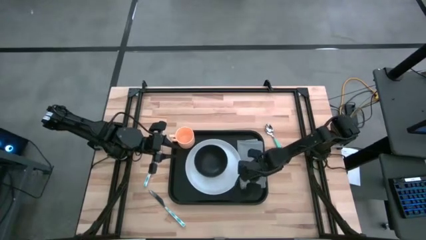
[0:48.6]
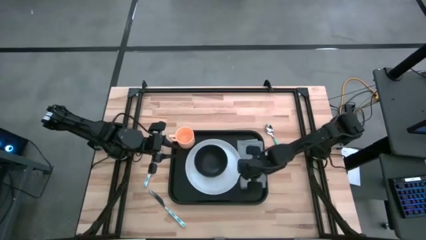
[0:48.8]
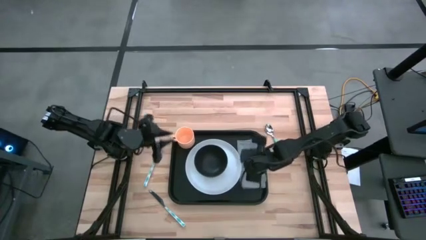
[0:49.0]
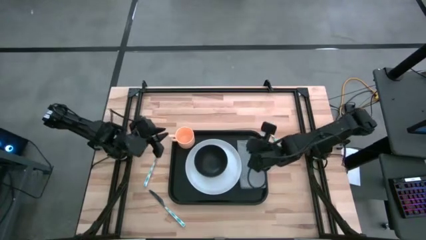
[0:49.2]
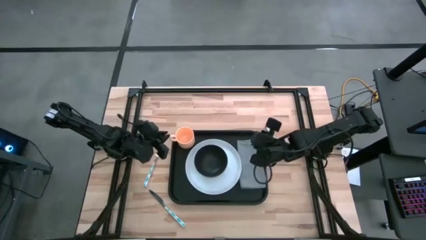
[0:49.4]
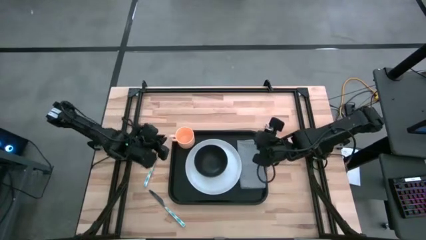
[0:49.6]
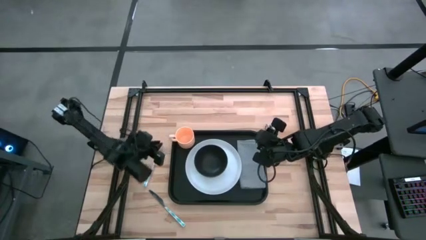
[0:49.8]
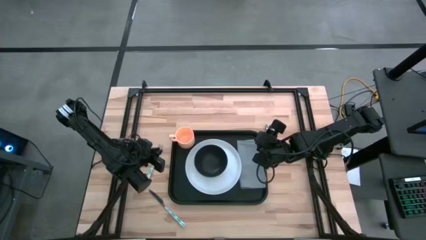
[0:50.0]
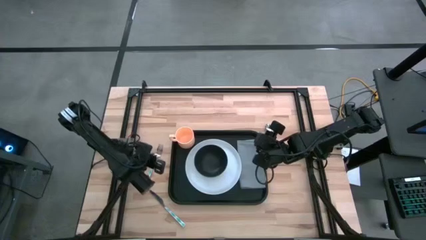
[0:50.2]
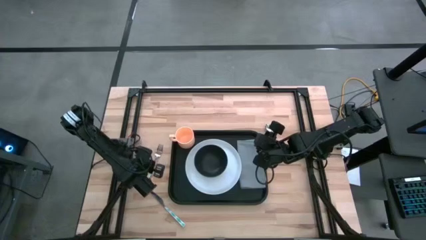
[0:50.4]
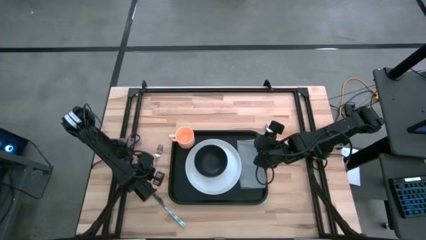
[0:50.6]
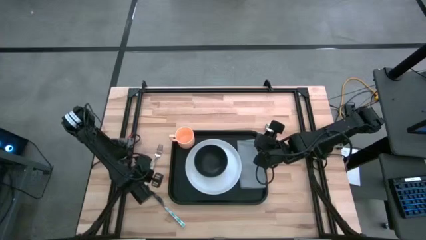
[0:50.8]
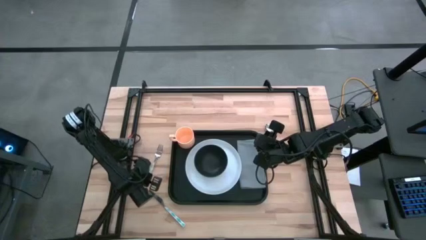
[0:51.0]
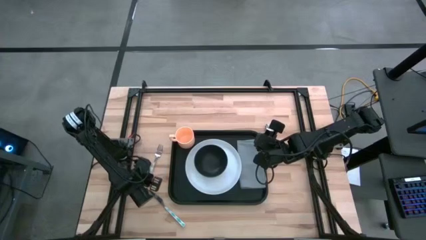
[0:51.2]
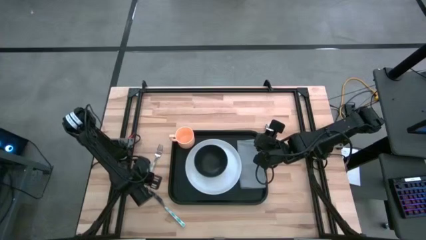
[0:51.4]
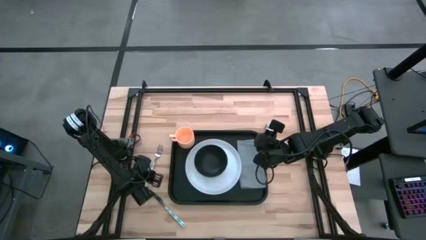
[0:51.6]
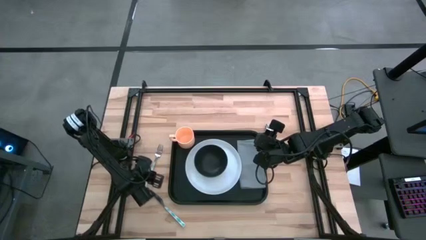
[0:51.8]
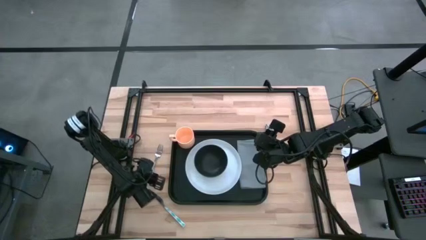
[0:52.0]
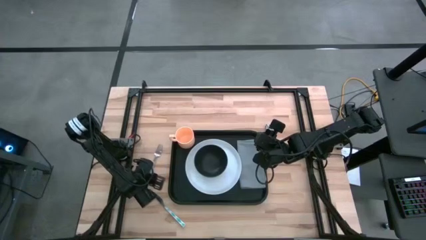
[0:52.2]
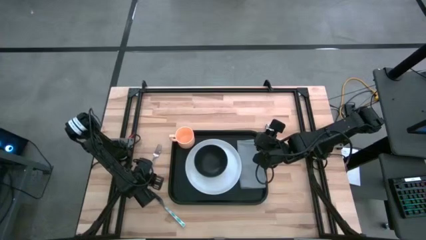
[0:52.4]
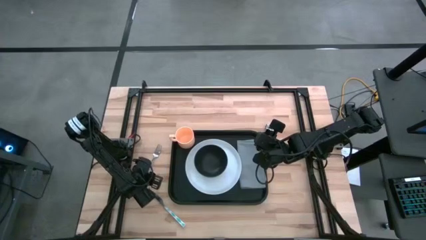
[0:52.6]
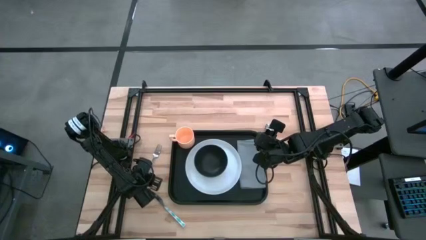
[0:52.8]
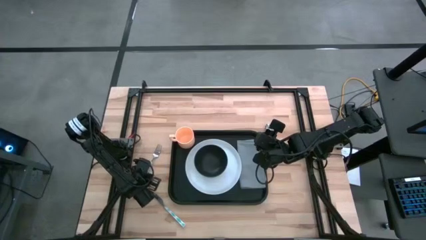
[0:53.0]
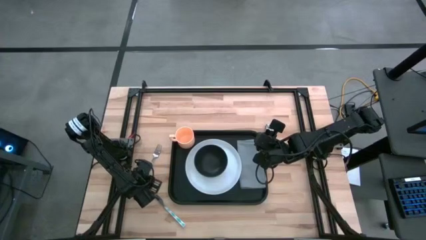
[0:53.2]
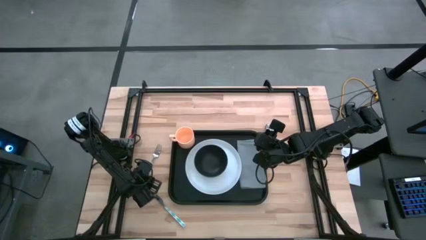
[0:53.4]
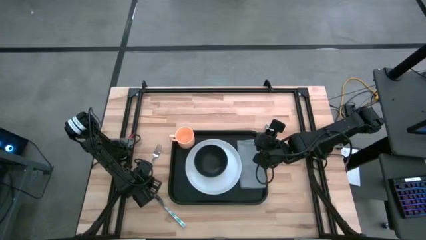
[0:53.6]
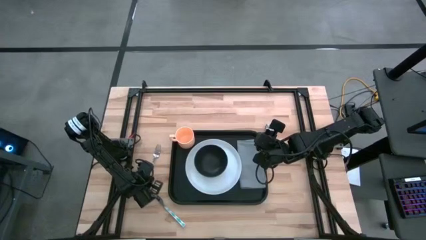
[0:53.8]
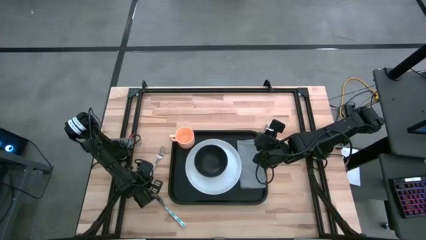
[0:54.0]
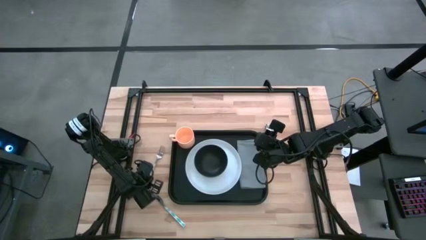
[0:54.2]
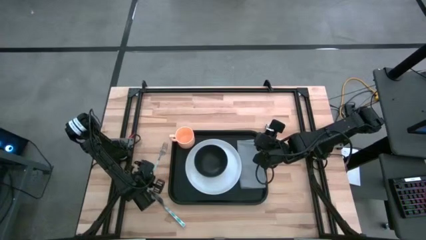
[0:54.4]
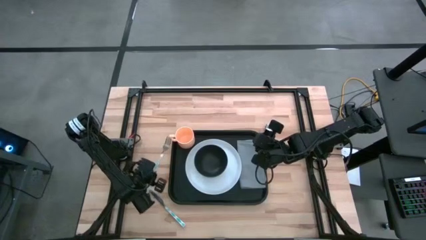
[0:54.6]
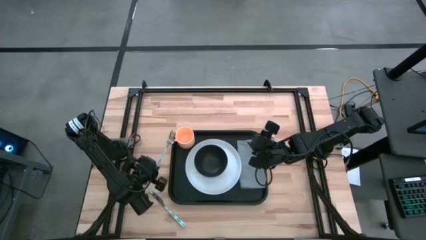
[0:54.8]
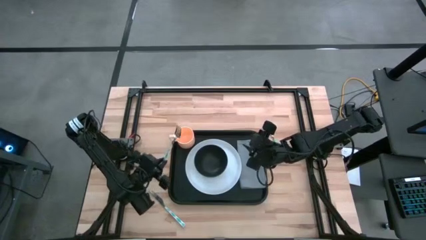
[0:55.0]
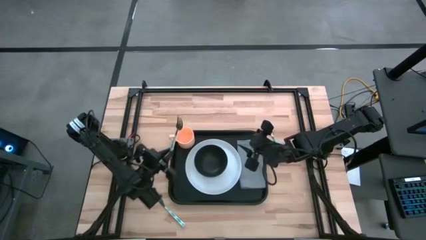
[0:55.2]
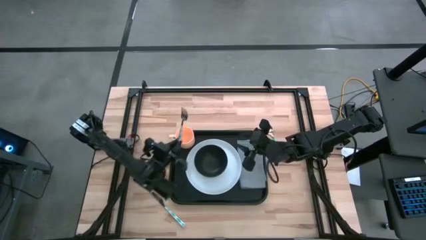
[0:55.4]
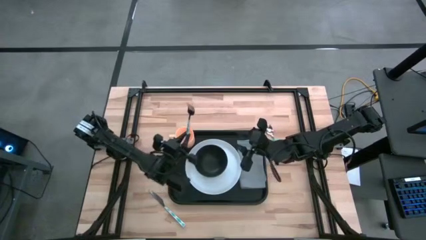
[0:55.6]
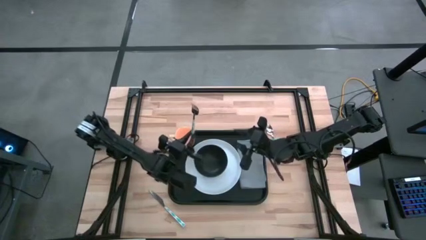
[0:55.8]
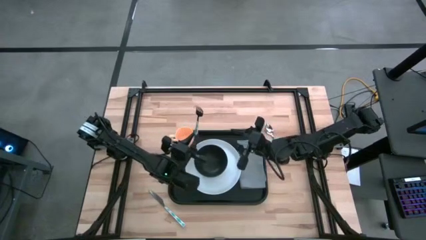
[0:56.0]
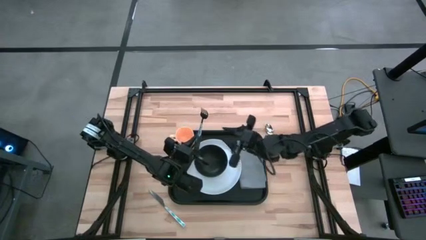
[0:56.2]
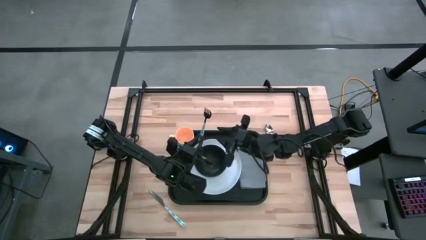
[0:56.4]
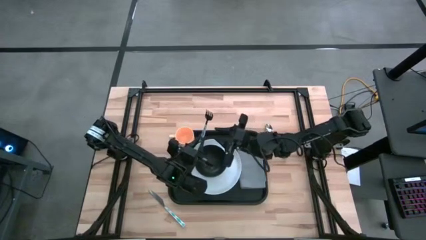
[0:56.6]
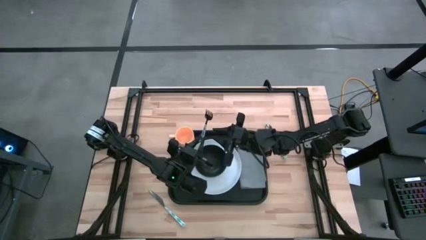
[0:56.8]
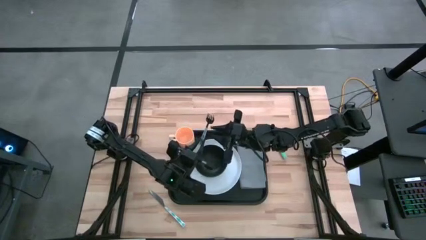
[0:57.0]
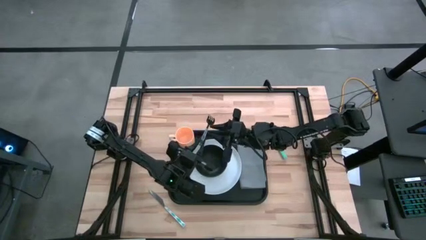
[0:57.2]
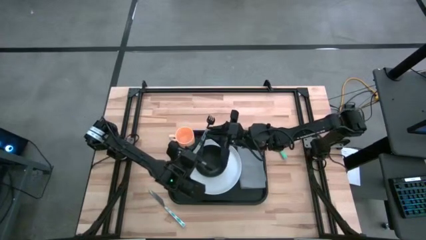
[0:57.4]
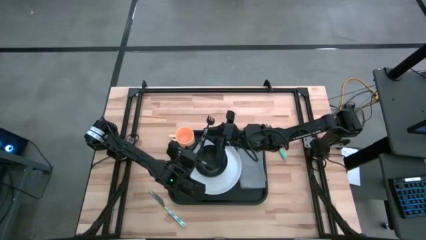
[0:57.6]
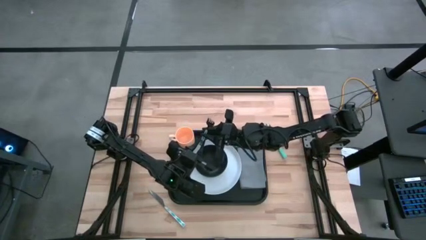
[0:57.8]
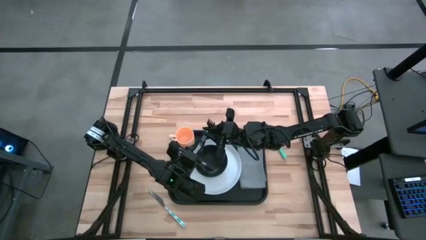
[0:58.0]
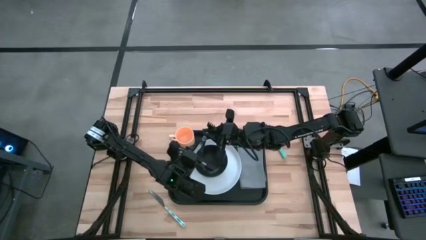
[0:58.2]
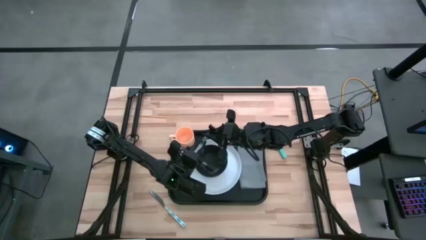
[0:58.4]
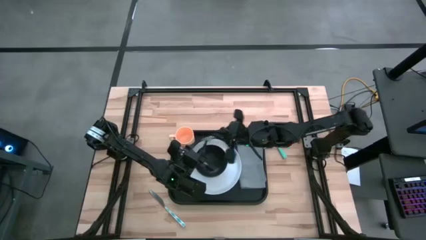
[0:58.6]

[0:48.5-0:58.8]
Task: Set up tray
Put the blue knife on the gray napkin to the right of the blue fork
